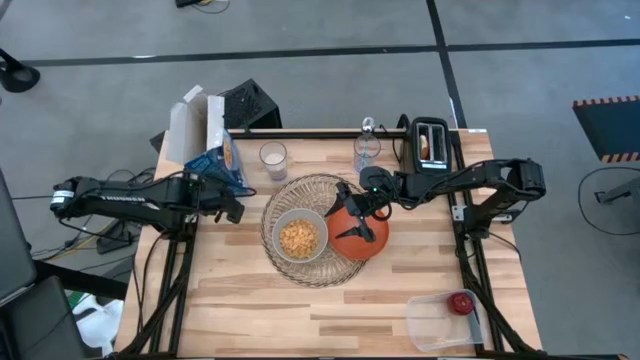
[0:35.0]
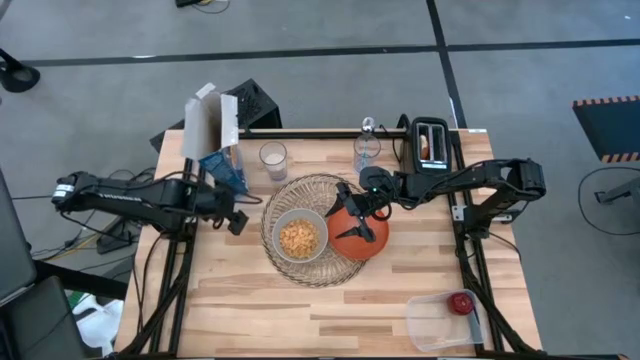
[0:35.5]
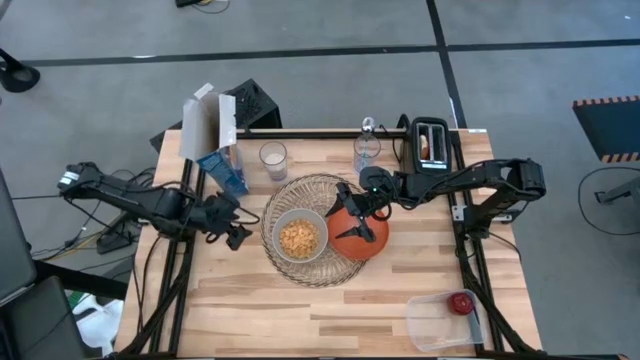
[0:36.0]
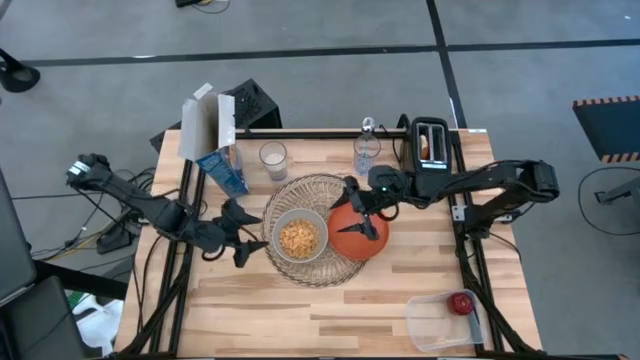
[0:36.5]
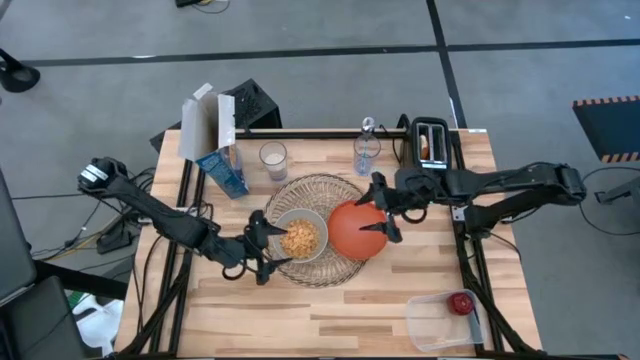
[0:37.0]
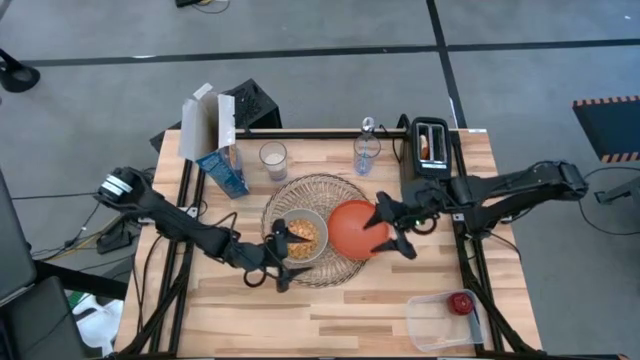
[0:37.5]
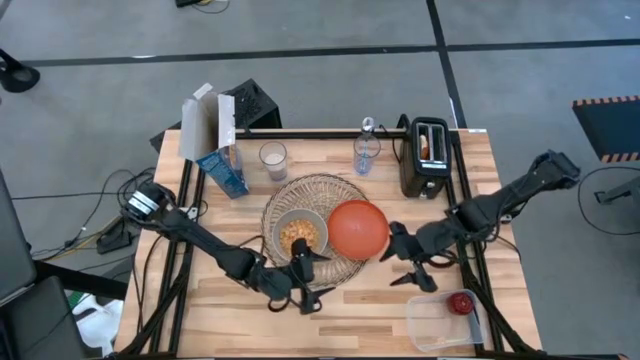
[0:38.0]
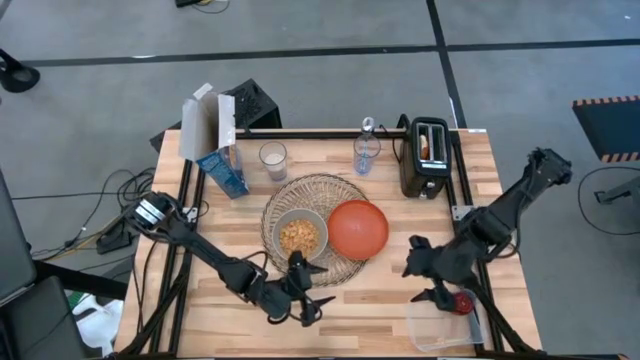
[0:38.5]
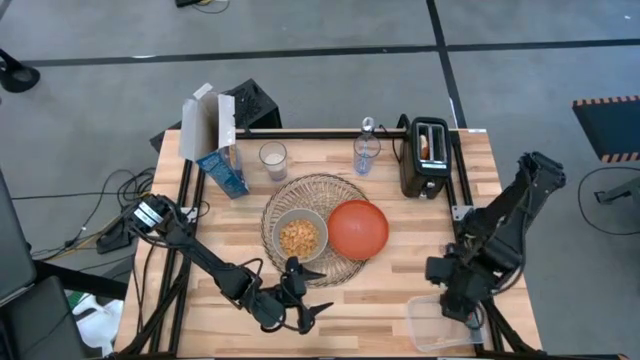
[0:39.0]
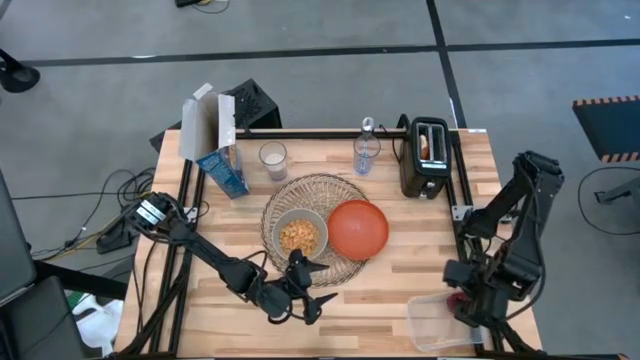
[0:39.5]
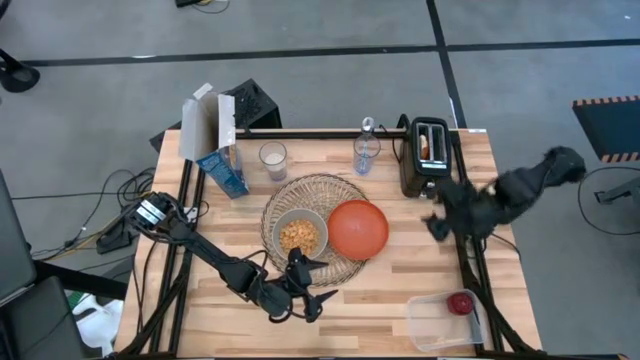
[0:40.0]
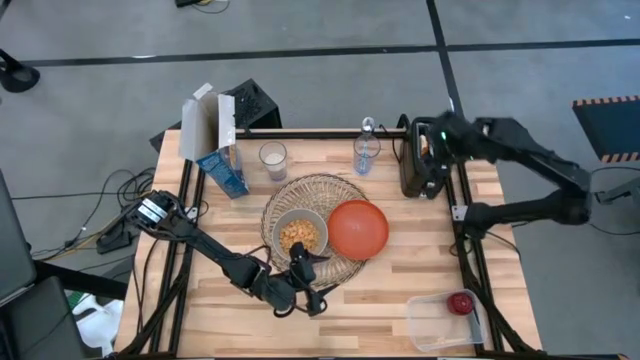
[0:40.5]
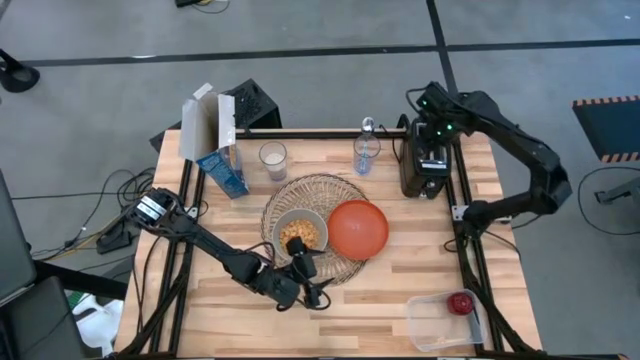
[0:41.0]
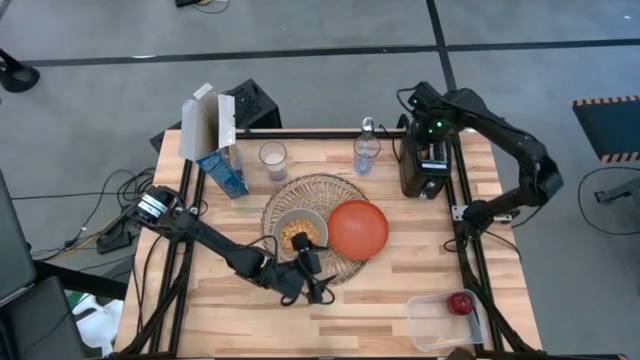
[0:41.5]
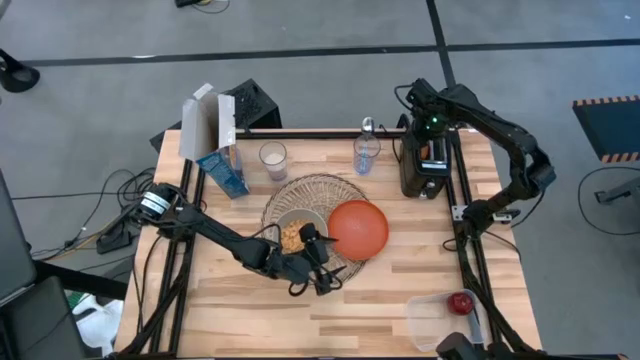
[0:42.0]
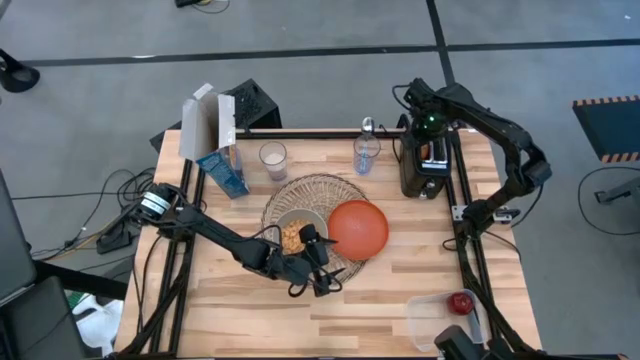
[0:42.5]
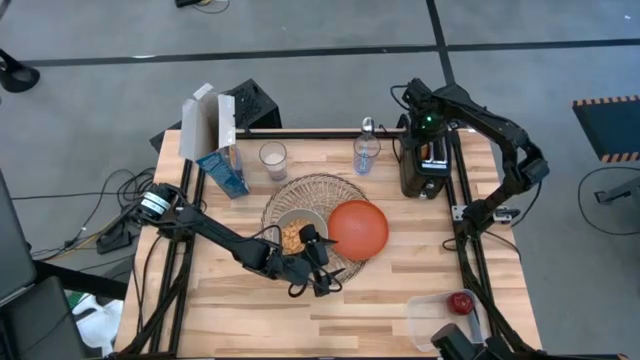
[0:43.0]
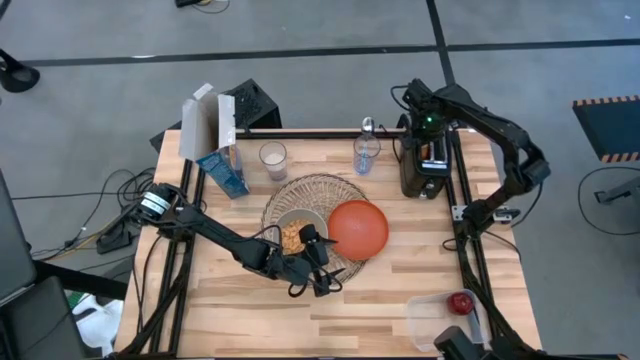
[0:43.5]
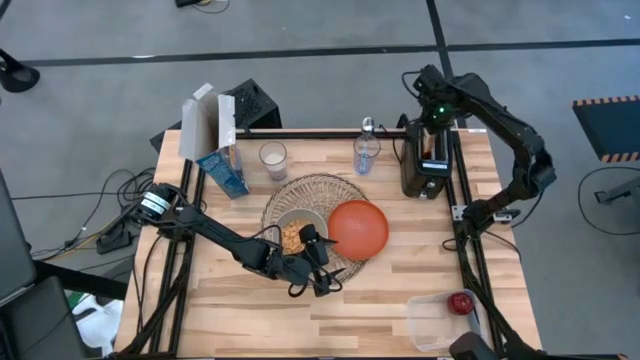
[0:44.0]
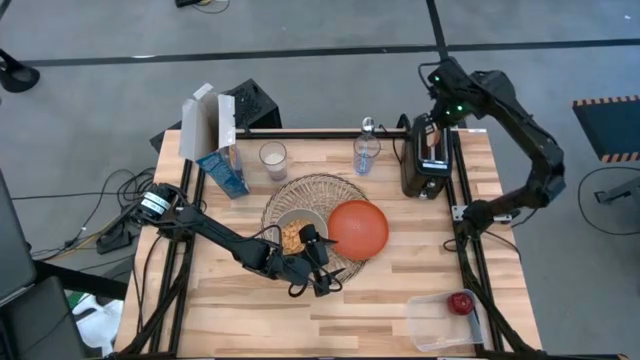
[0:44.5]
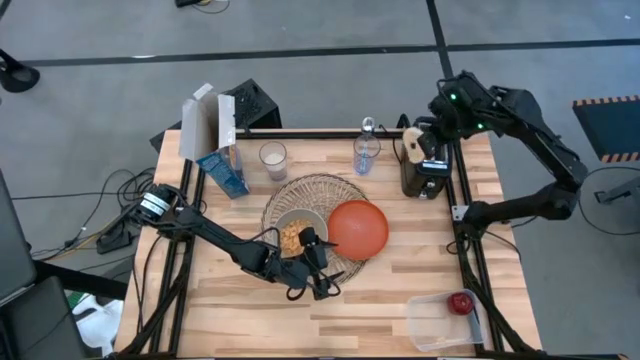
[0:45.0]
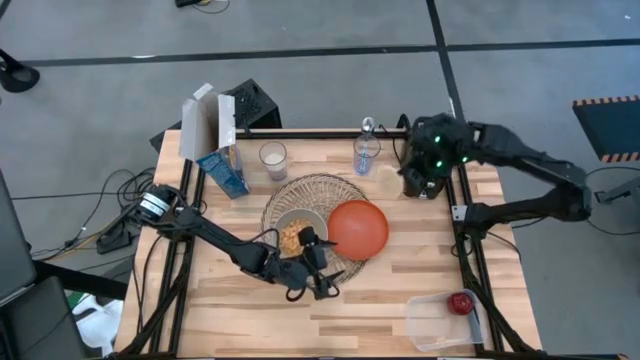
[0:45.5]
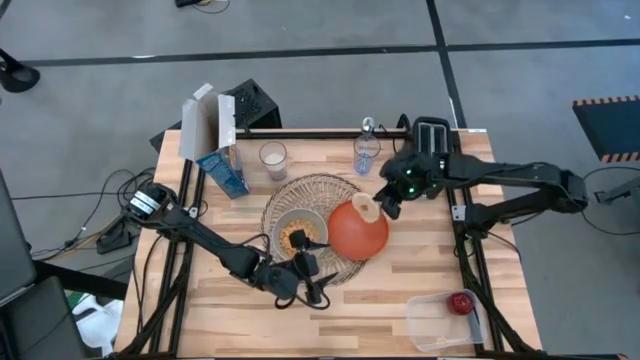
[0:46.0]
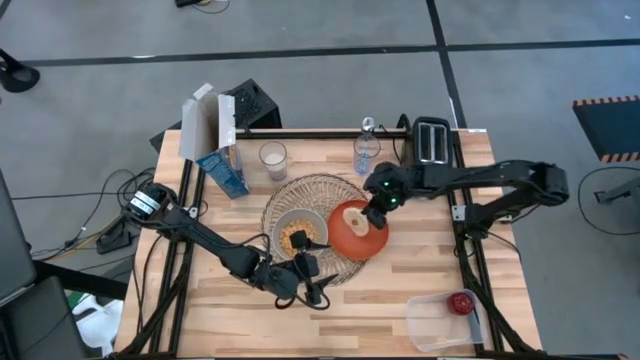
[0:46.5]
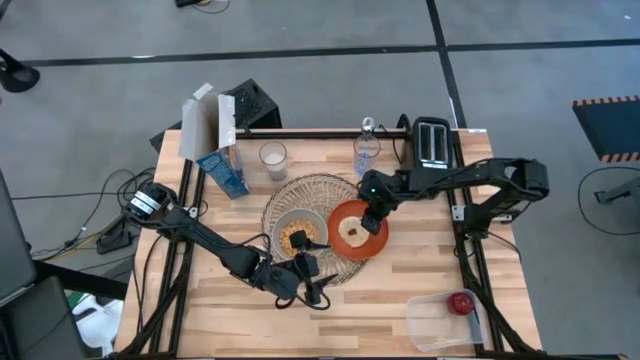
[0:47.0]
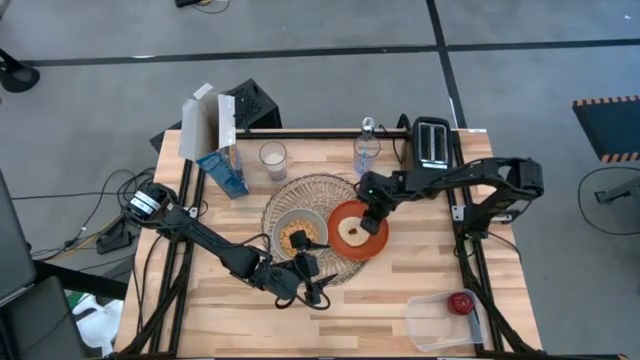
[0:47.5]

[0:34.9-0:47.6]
Task: Arrange a breakfast setting
Put the bagel from the toaster on the orange plate

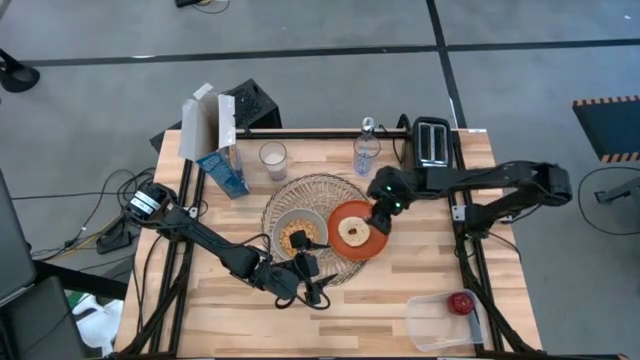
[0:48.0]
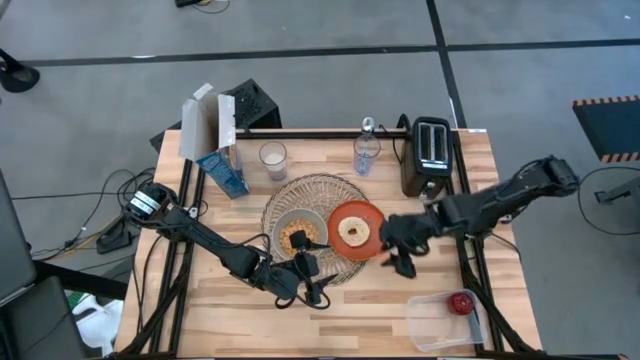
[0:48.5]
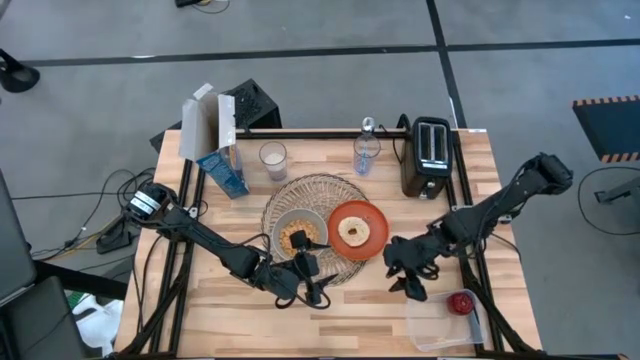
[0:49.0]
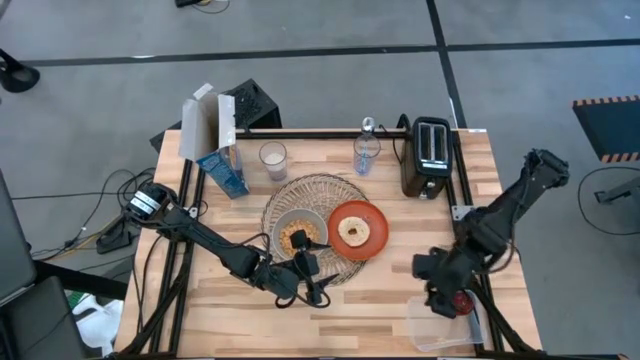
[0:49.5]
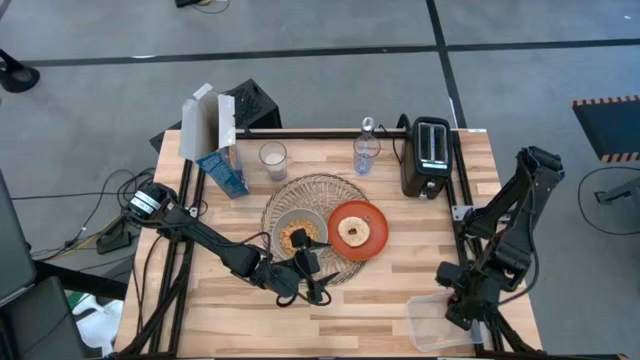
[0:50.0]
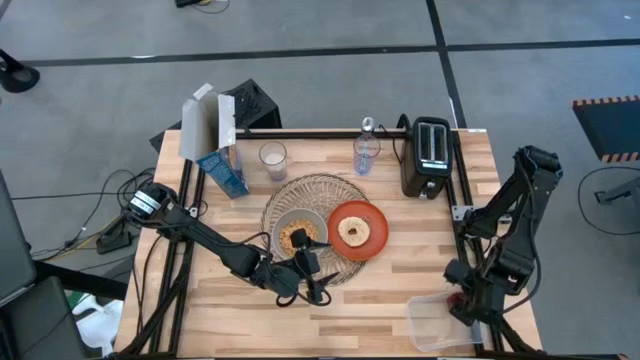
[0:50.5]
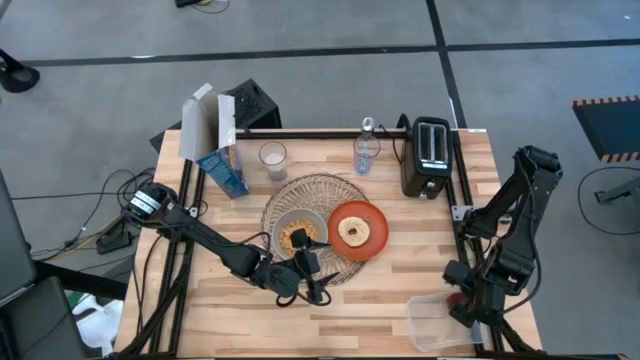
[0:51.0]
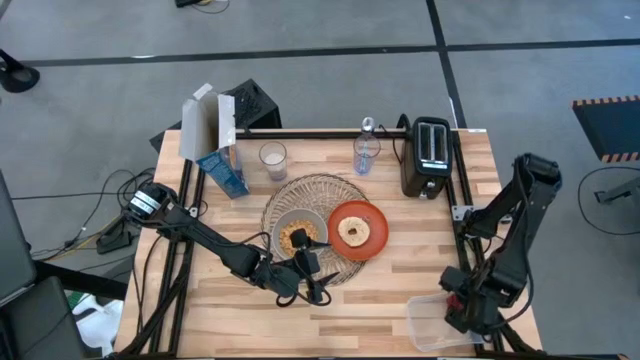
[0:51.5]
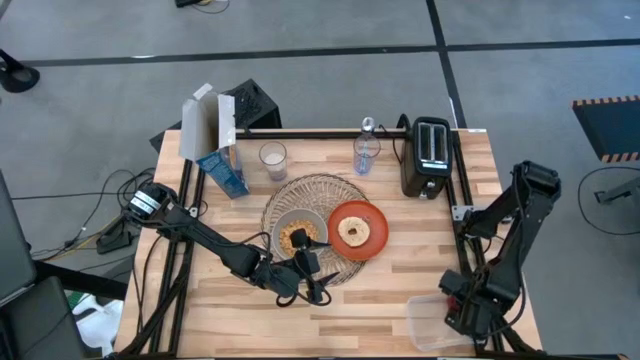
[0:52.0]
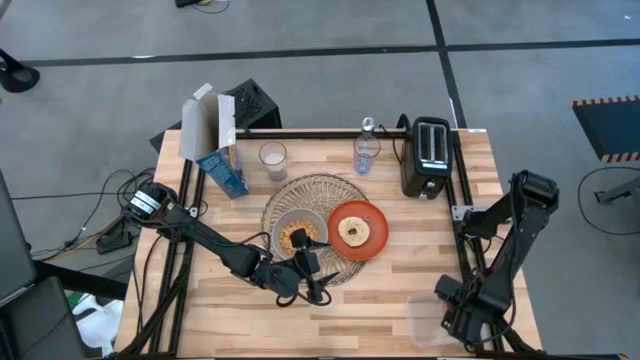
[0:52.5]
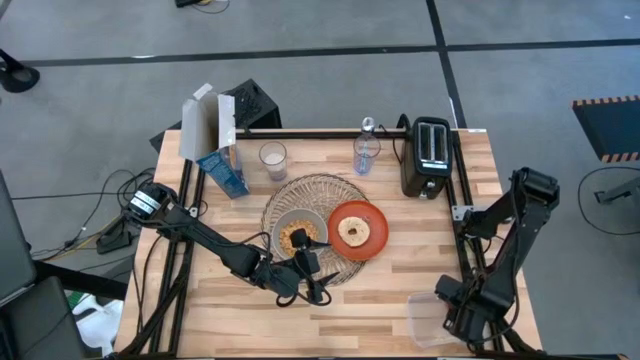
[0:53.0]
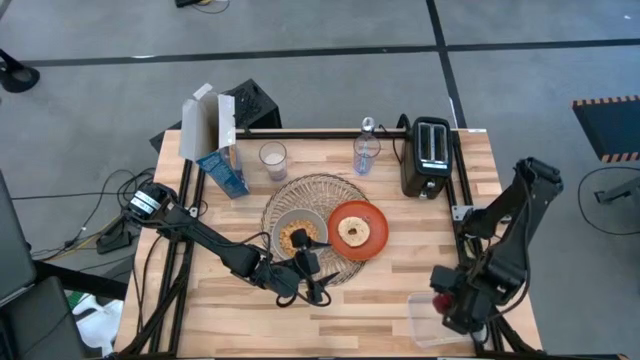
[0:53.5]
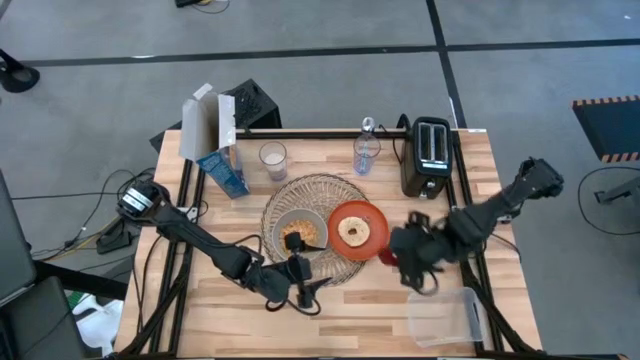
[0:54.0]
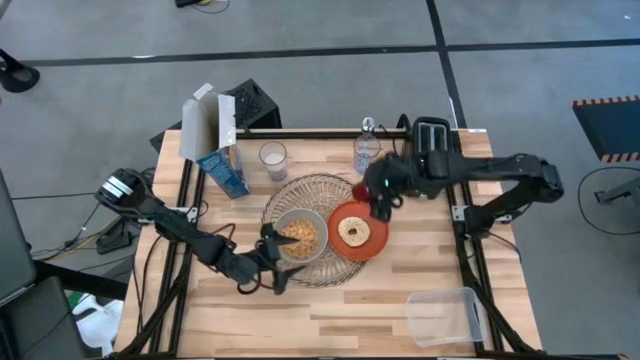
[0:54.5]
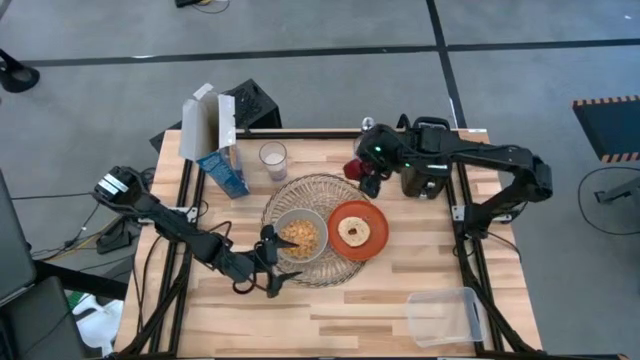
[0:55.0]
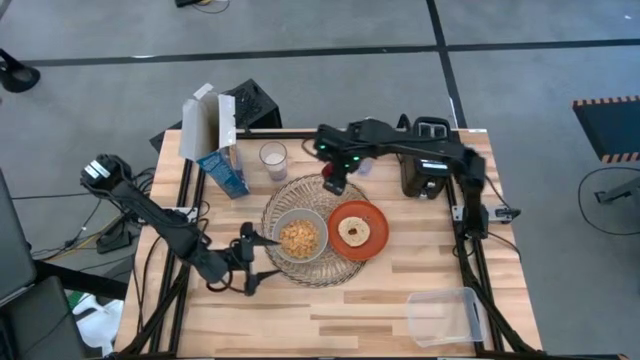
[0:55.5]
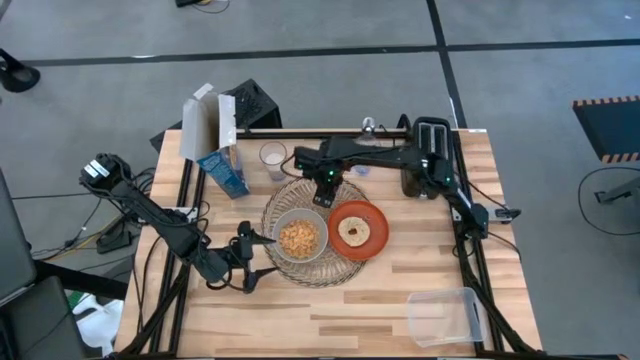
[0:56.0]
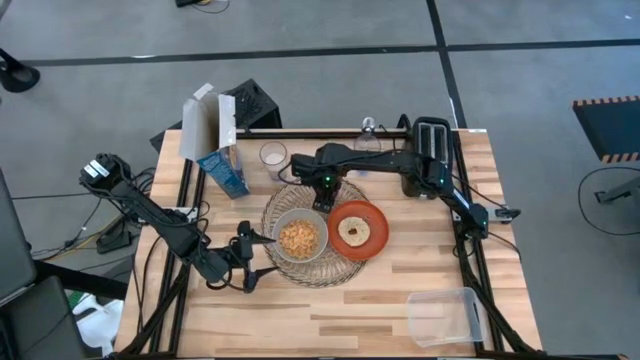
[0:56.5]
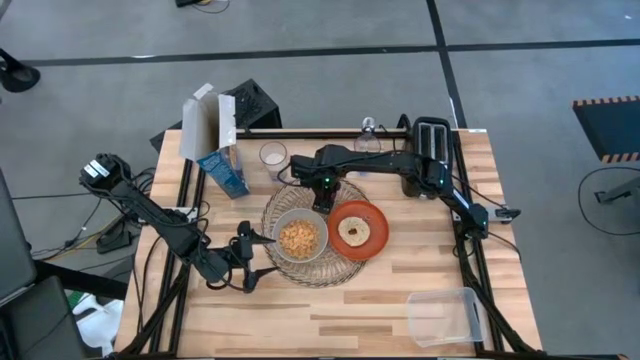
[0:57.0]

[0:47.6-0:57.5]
Put the apple on the brown placemat to the top left of the orange plate
